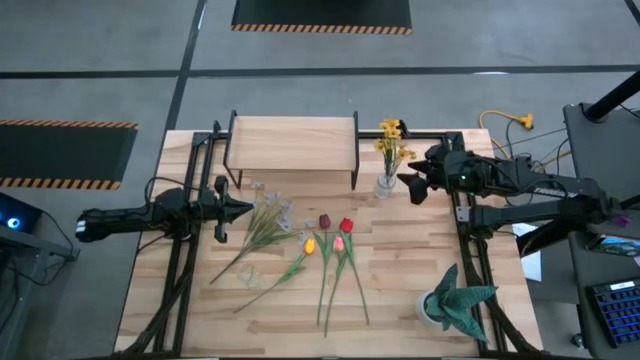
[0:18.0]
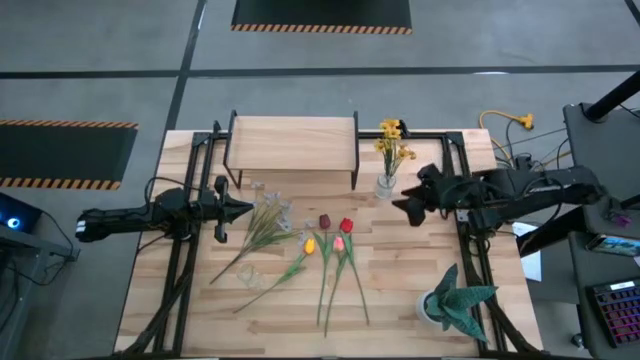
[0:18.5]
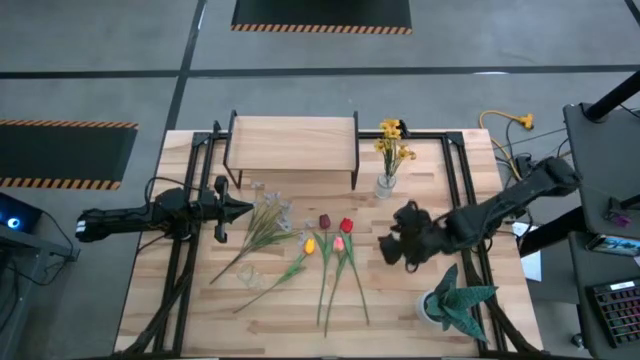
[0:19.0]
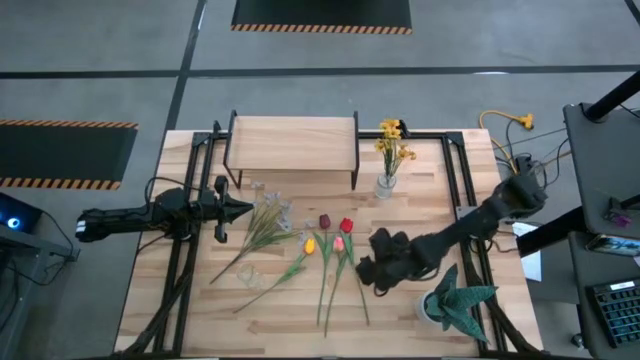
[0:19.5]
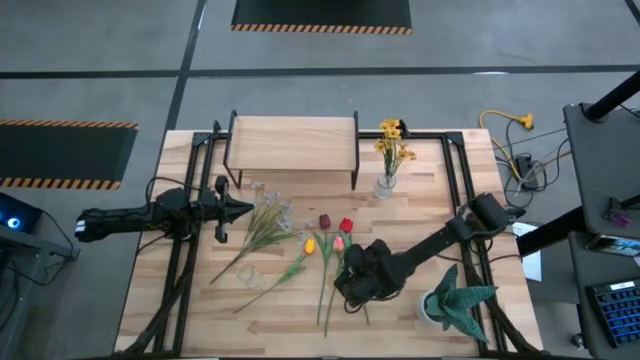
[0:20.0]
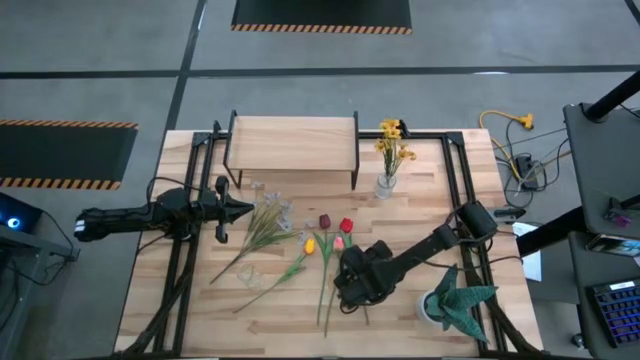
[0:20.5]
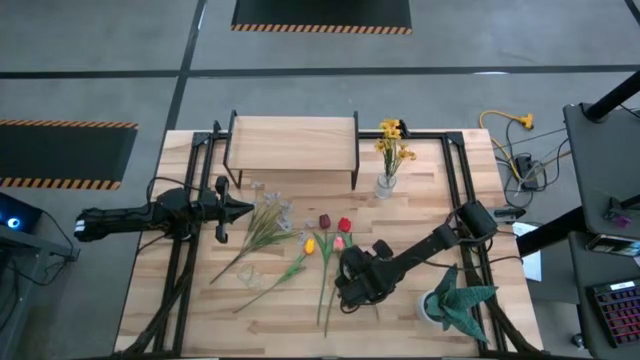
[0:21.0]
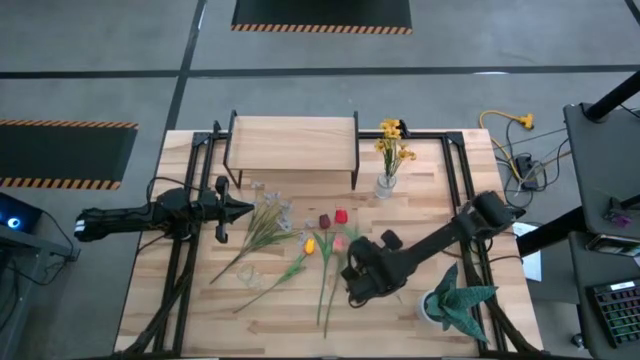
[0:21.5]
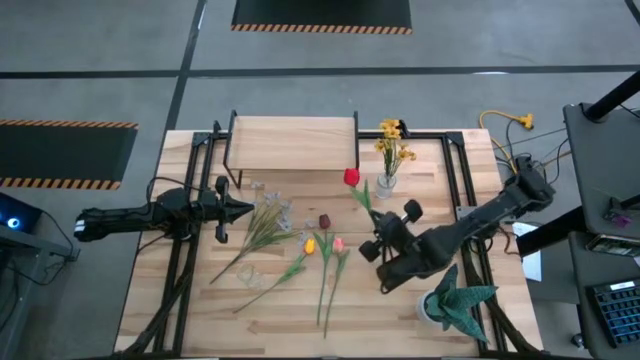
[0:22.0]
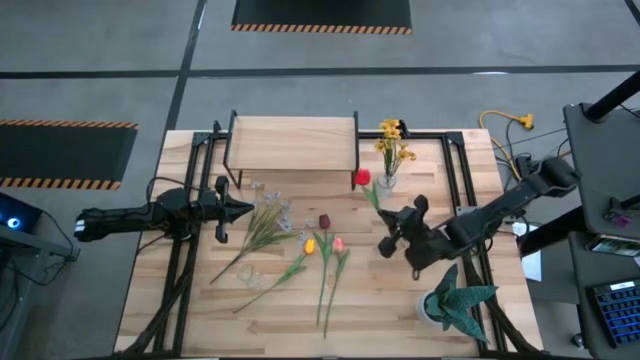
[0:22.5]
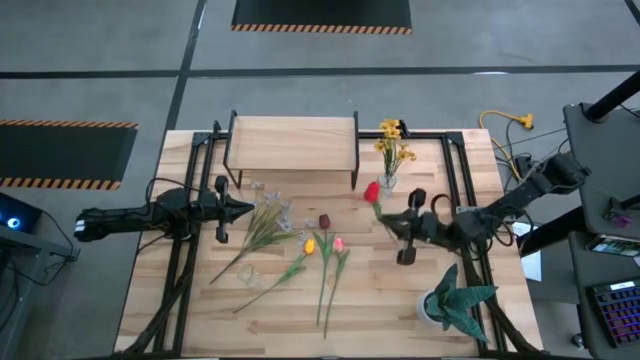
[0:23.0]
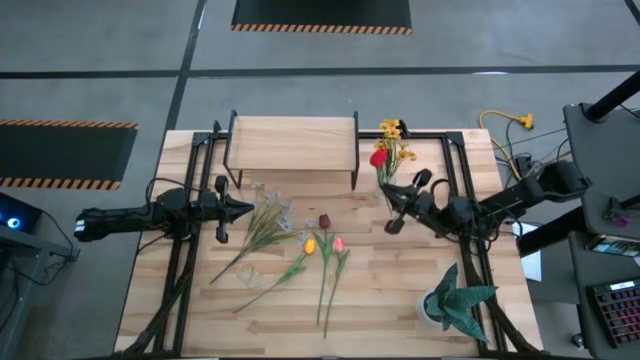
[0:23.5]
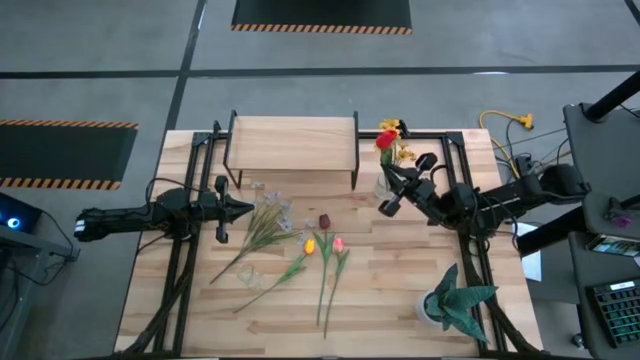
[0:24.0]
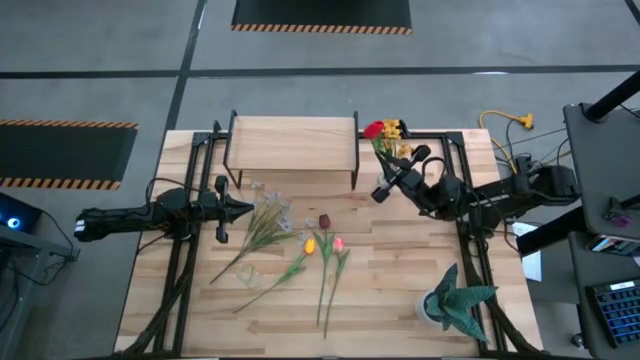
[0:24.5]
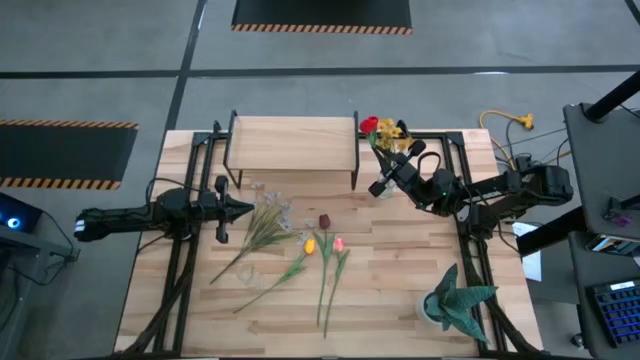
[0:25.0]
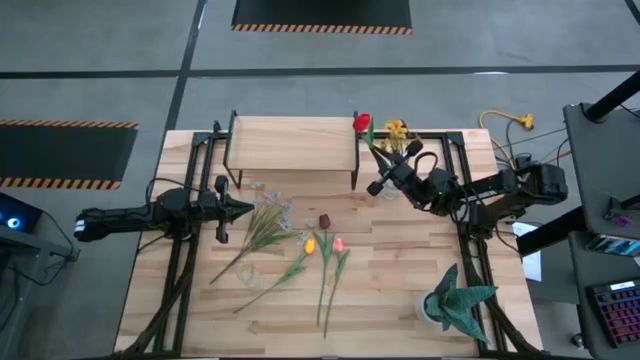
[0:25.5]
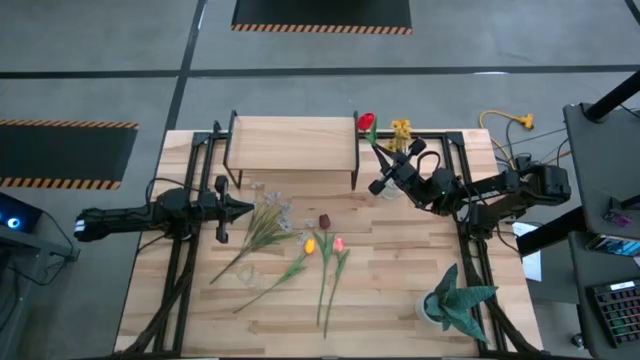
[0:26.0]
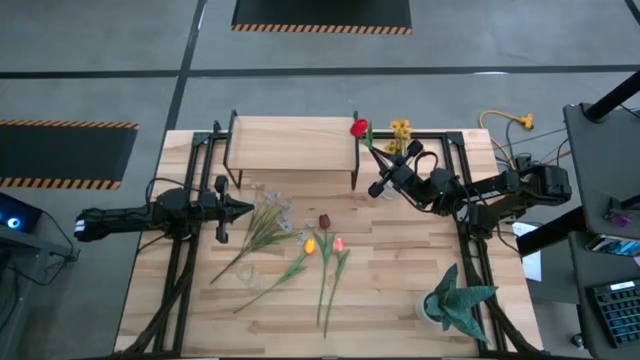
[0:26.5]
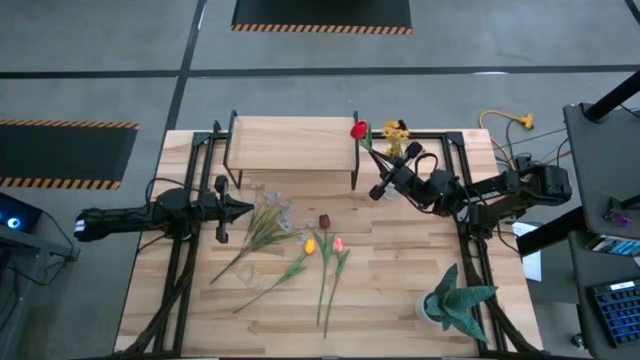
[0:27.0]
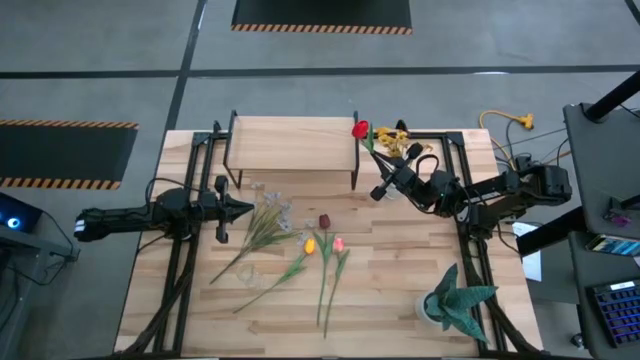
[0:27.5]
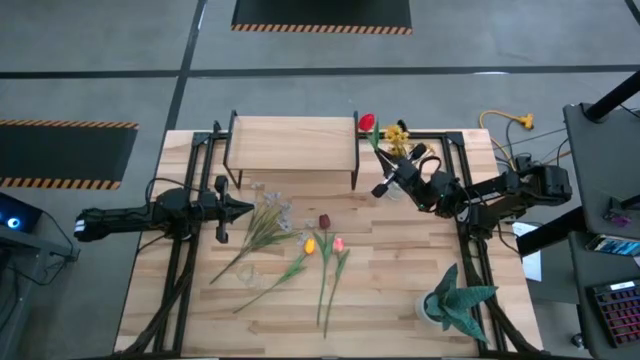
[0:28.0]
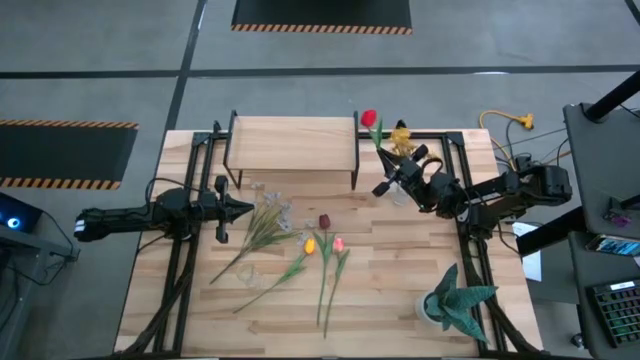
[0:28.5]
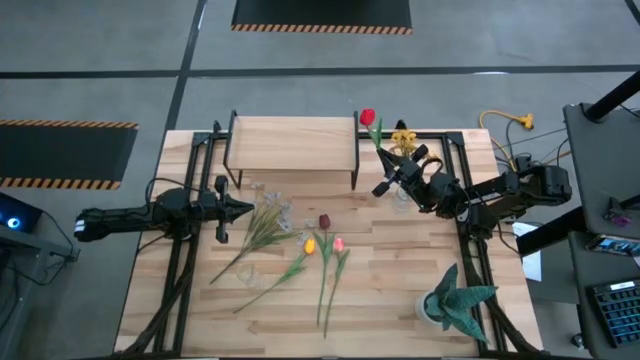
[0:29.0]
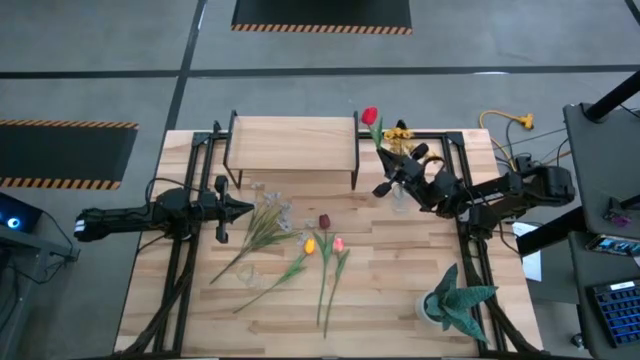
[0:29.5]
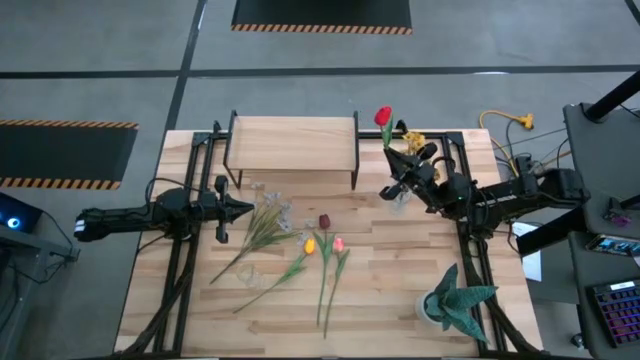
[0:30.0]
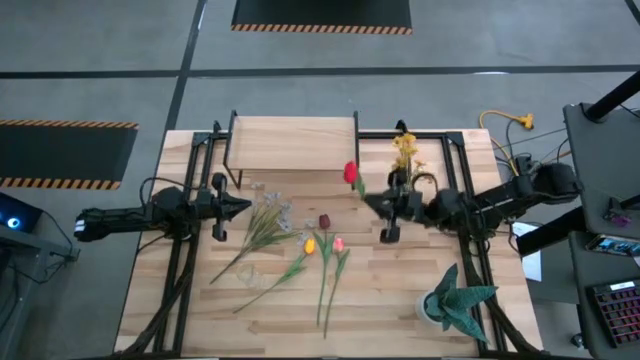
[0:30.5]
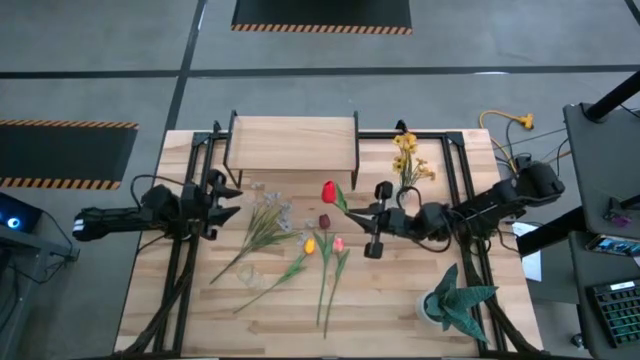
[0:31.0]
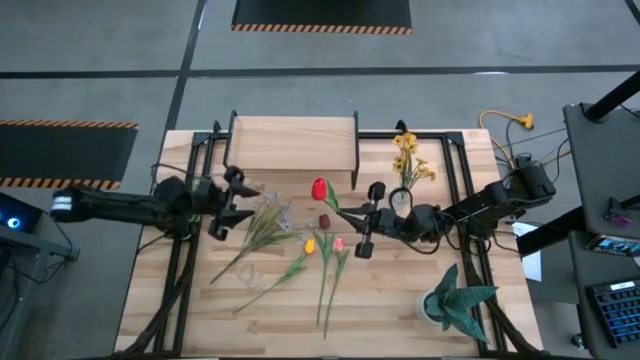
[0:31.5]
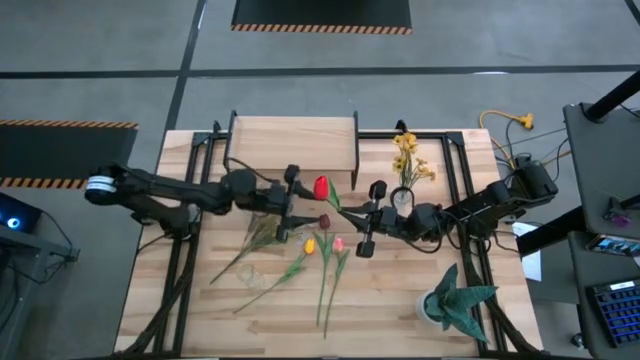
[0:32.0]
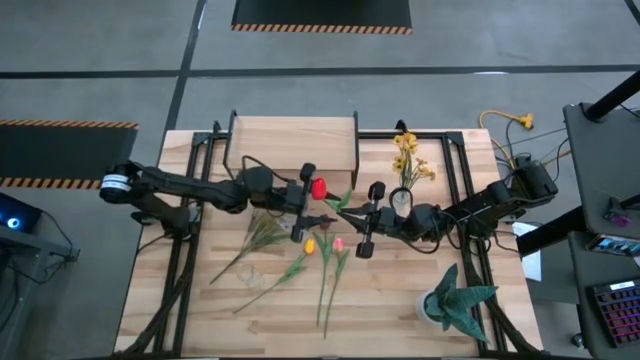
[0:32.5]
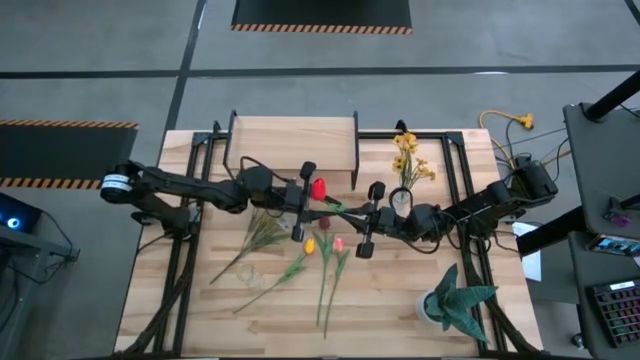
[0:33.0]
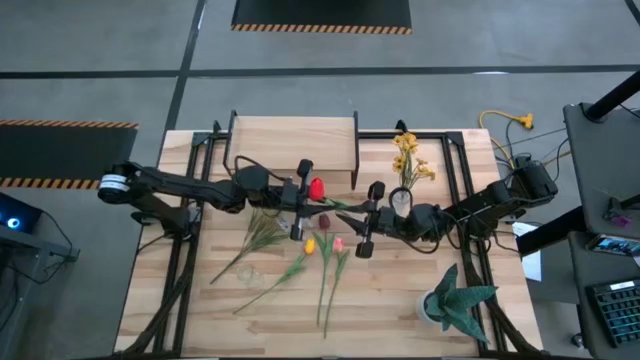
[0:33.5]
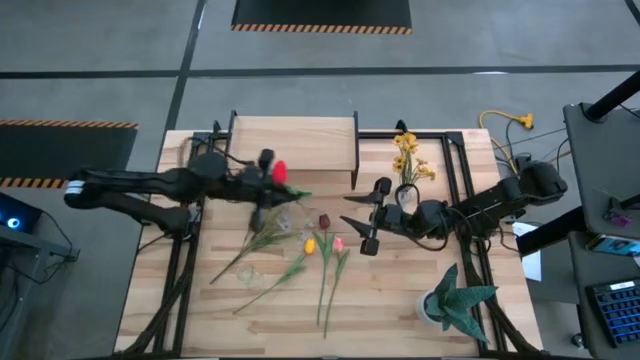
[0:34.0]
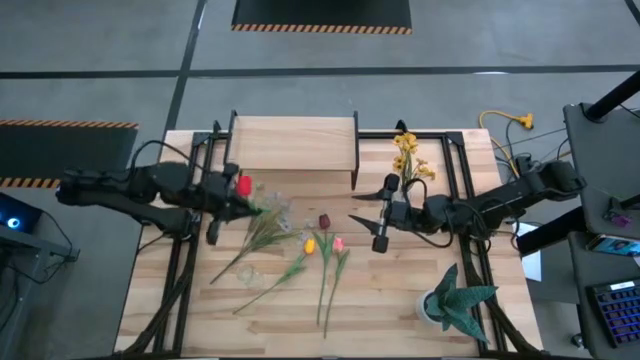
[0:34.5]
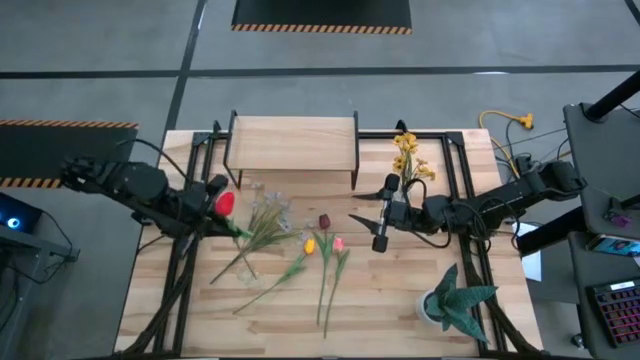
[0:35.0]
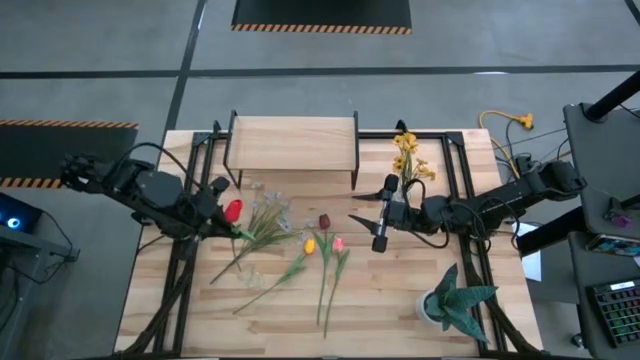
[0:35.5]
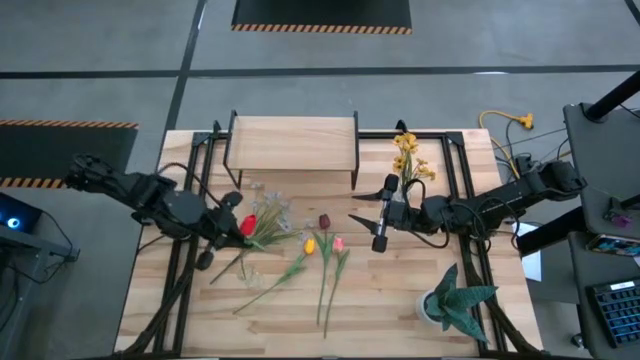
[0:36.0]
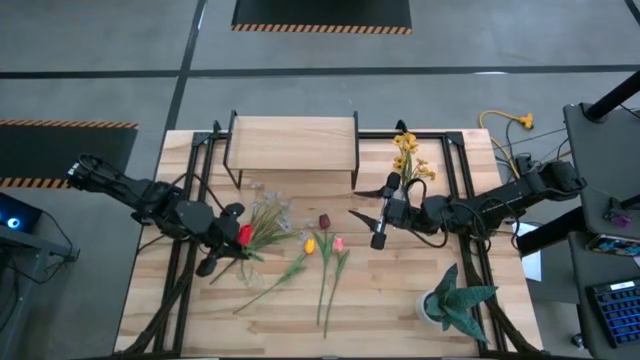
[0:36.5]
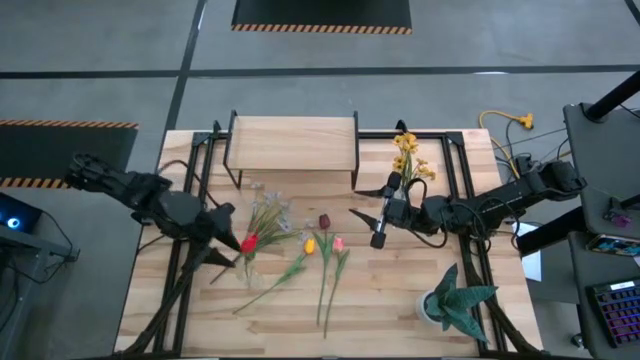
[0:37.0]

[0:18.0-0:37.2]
Task: Pick and place flowers into a vace then onto a shelf
Put the red flower into the left transparent vase
